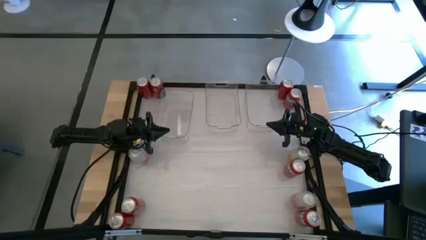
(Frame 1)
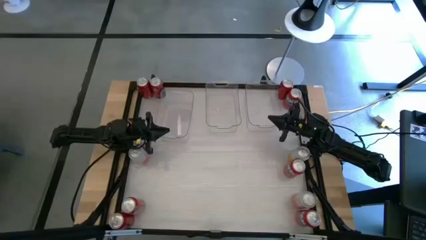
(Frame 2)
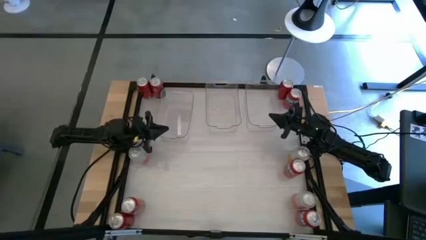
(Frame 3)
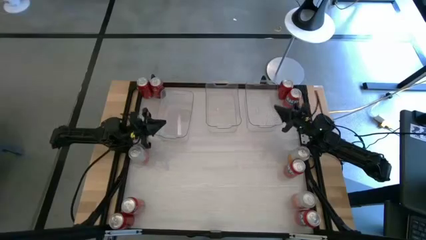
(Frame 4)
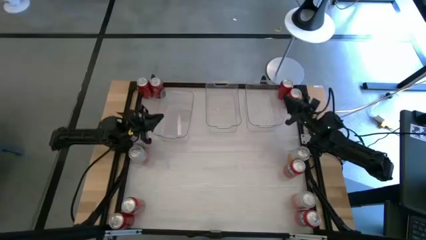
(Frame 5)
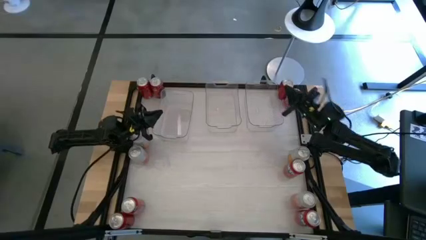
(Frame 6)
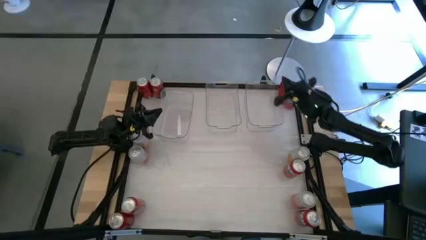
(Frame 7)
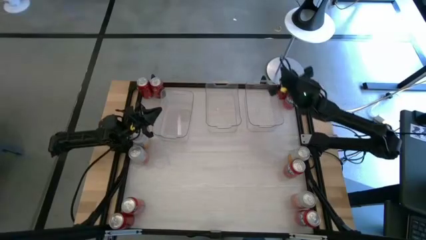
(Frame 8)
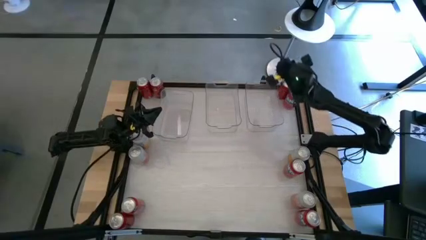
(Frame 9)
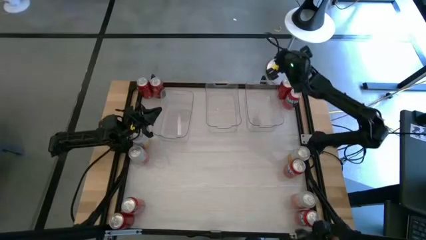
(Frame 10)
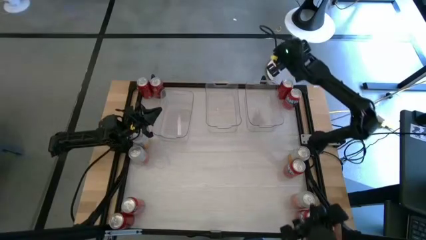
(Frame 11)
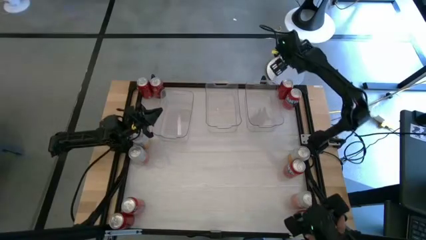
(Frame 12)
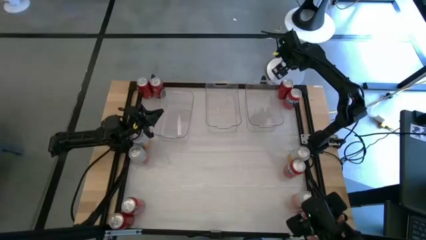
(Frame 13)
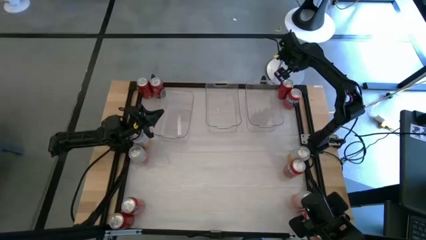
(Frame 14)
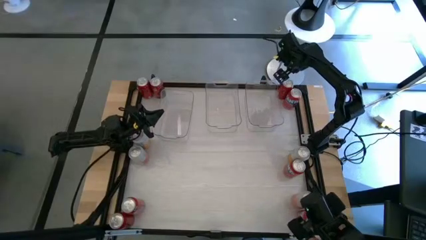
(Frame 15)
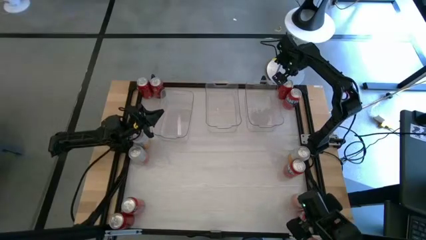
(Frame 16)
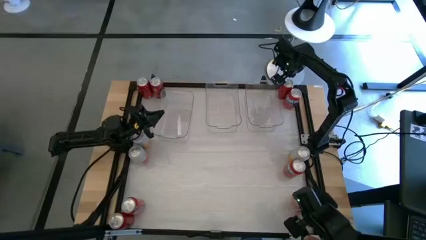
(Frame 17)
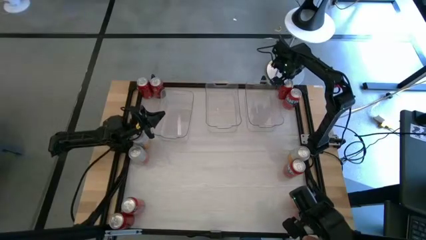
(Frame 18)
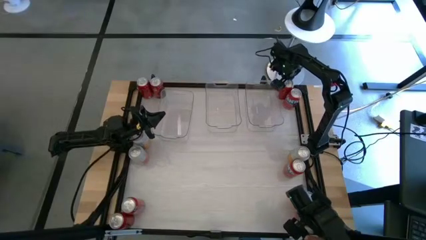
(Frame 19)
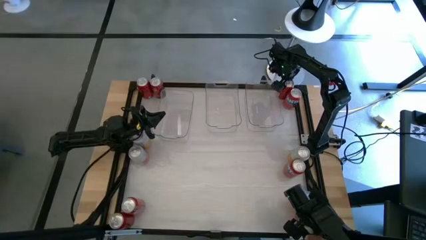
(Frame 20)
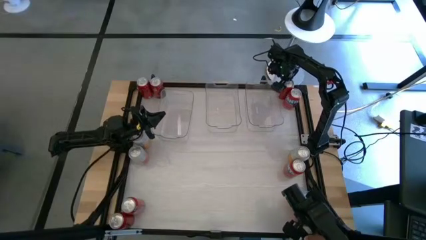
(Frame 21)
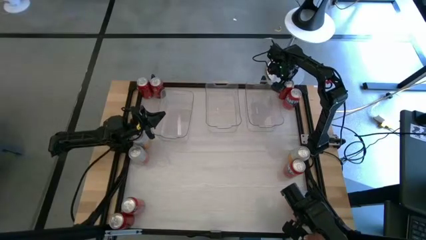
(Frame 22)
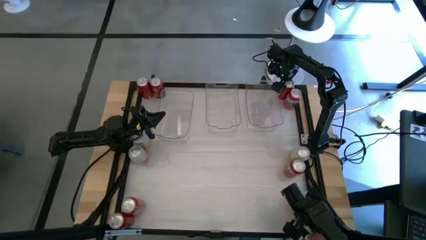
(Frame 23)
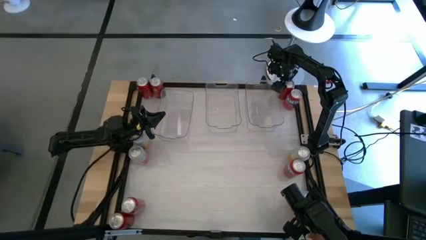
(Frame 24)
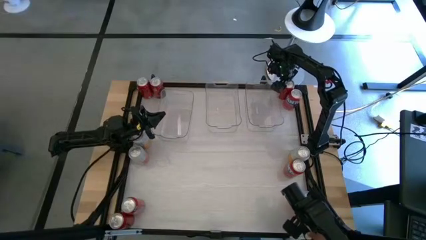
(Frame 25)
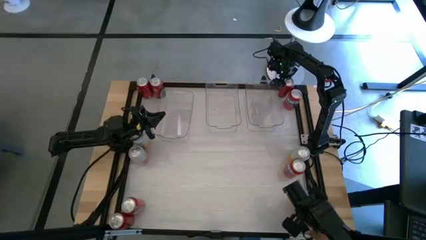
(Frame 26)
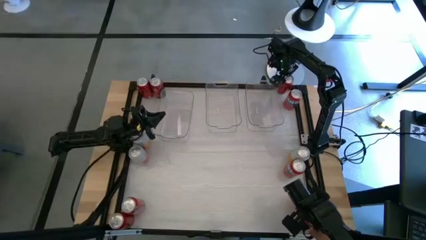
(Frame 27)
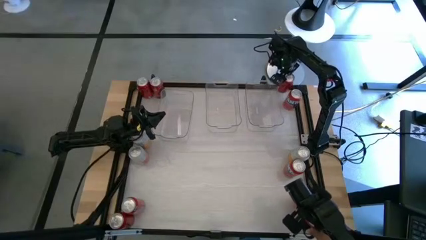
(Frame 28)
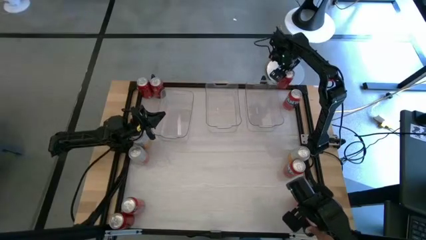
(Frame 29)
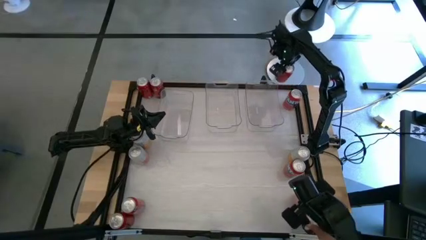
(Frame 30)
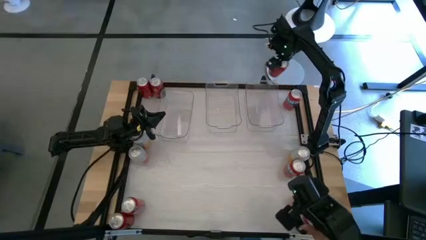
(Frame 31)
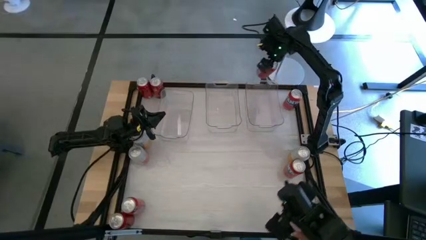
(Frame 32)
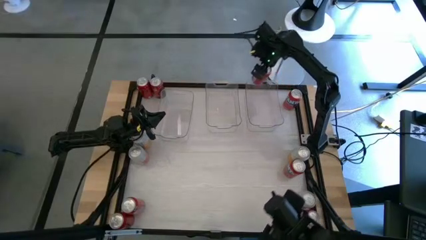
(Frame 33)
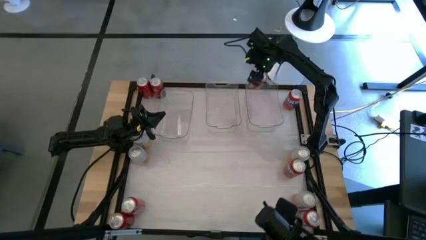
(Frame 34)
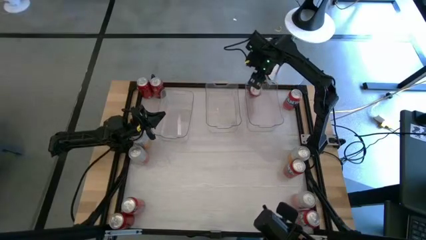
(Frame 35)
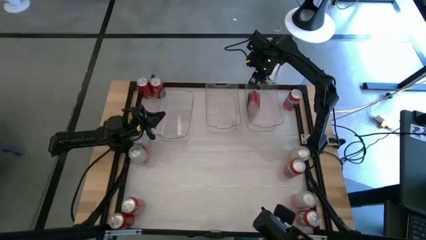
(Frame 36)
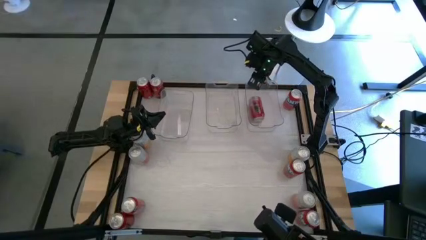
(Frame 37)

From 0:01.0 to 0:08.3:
Task: Sort soda cans
Put the top right red black soda can into the right transparent bin

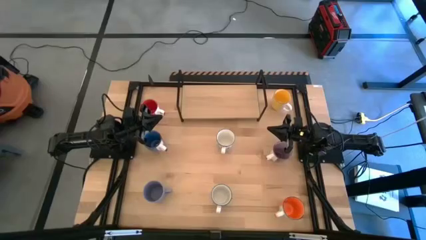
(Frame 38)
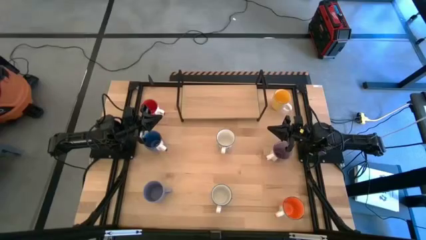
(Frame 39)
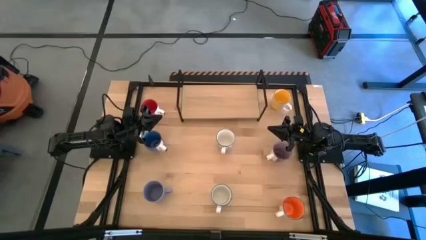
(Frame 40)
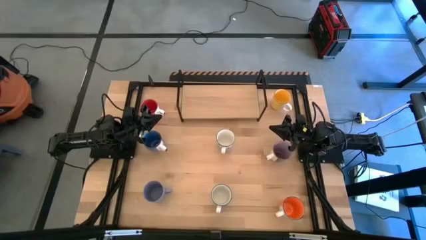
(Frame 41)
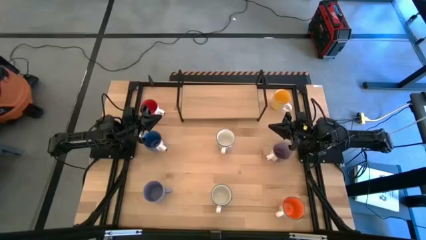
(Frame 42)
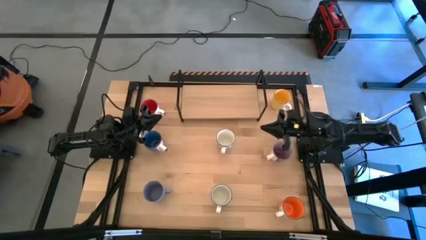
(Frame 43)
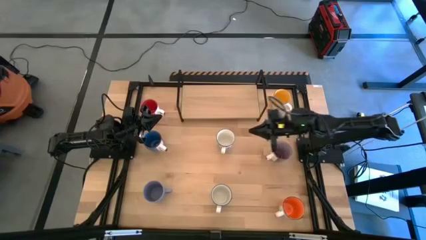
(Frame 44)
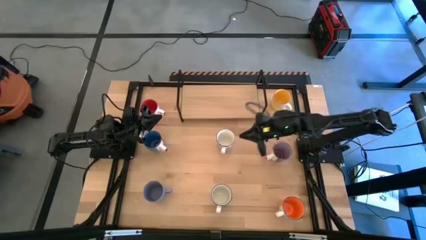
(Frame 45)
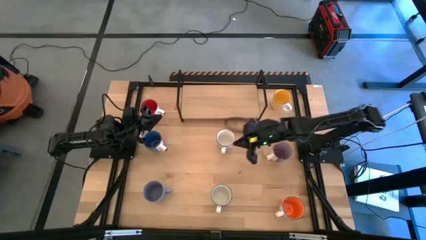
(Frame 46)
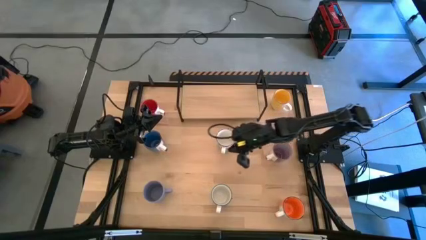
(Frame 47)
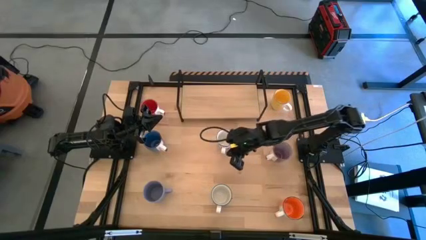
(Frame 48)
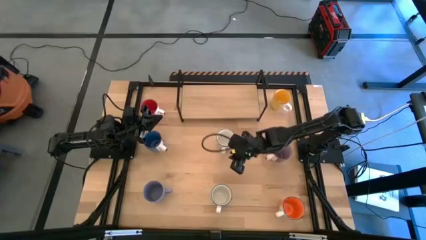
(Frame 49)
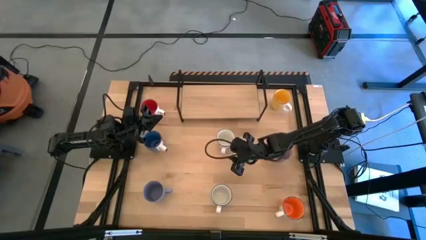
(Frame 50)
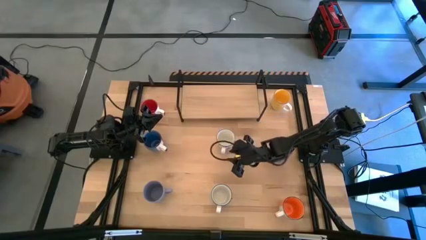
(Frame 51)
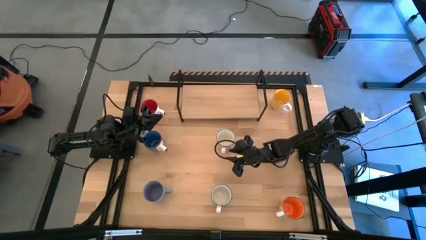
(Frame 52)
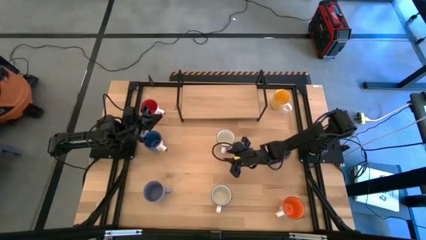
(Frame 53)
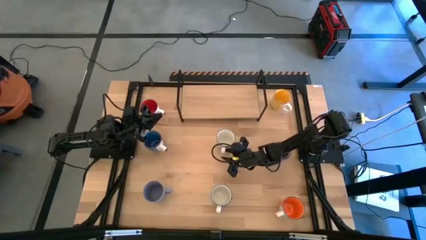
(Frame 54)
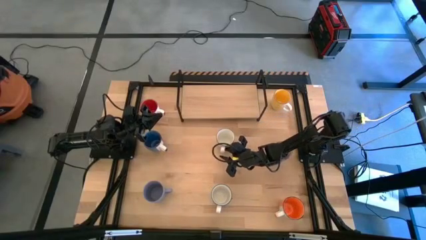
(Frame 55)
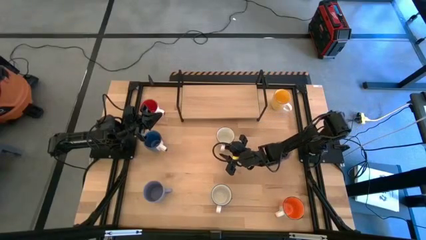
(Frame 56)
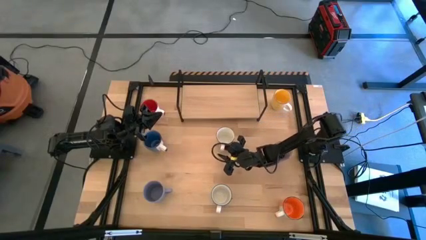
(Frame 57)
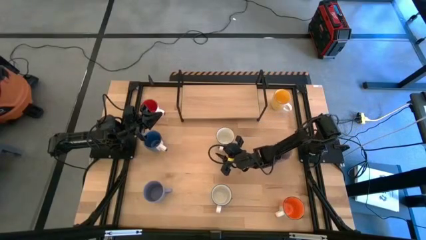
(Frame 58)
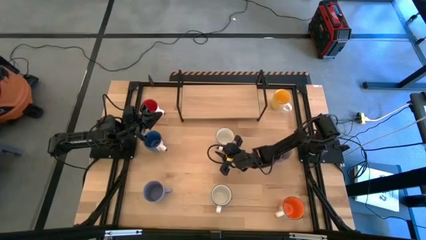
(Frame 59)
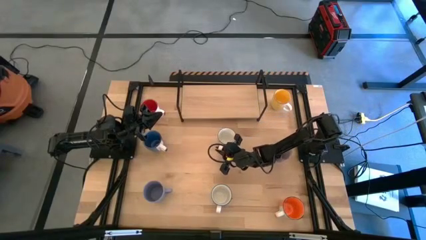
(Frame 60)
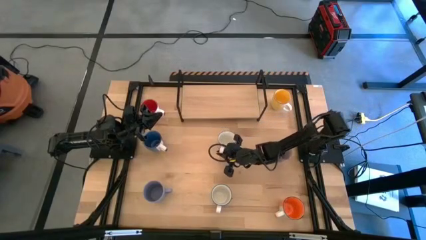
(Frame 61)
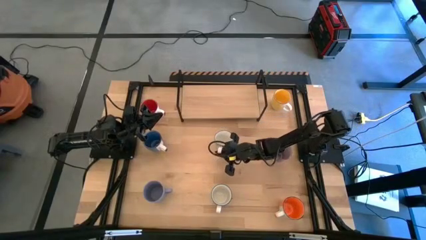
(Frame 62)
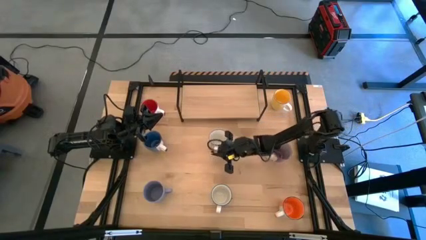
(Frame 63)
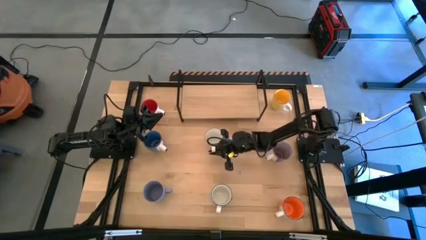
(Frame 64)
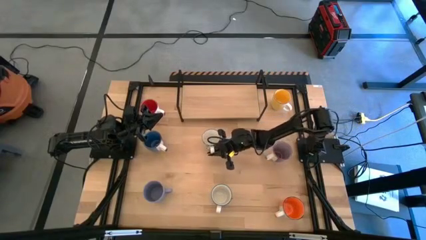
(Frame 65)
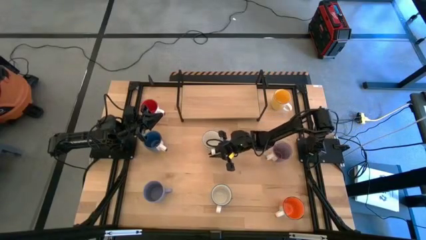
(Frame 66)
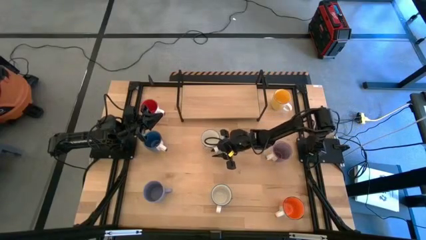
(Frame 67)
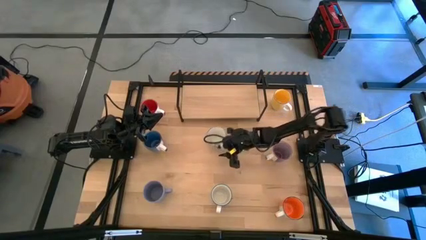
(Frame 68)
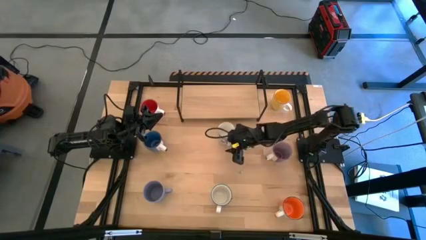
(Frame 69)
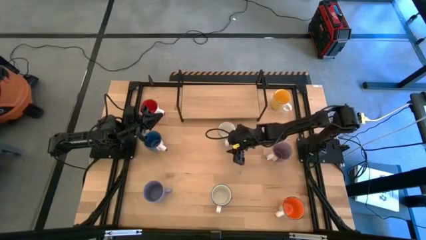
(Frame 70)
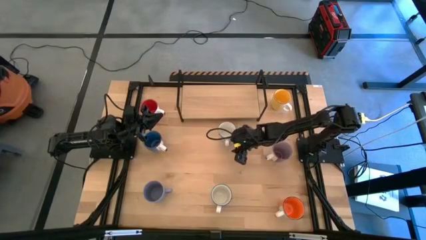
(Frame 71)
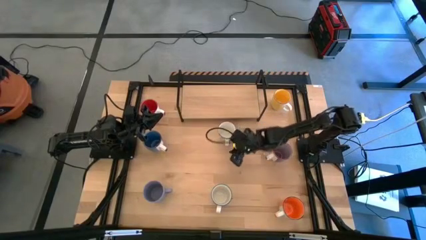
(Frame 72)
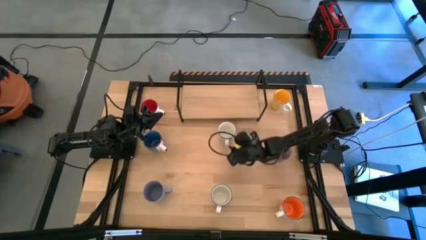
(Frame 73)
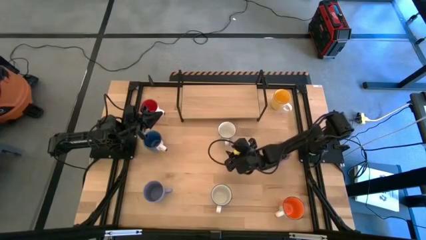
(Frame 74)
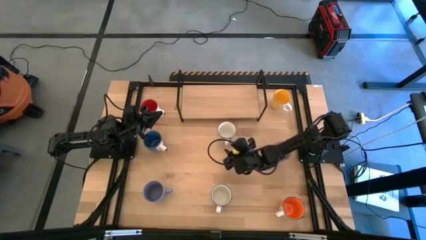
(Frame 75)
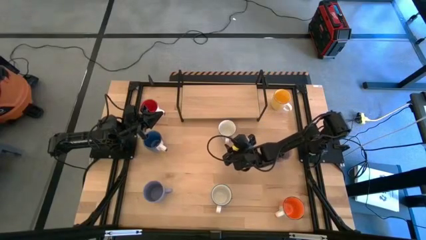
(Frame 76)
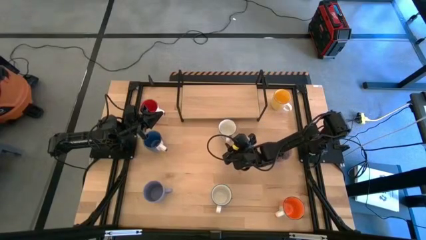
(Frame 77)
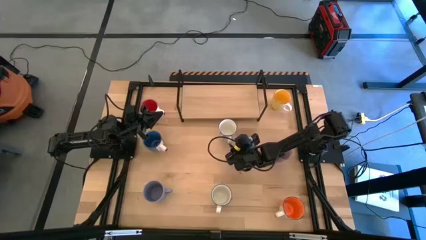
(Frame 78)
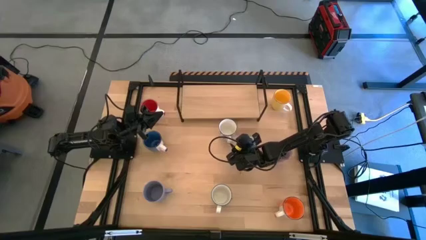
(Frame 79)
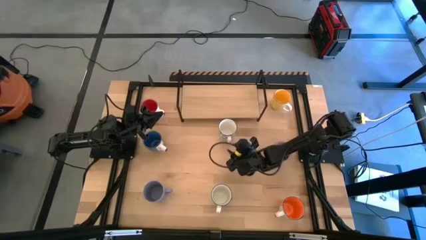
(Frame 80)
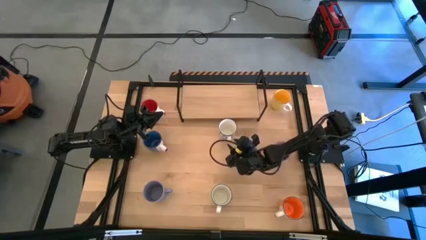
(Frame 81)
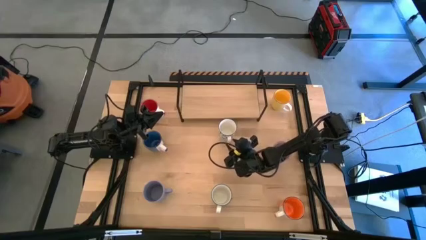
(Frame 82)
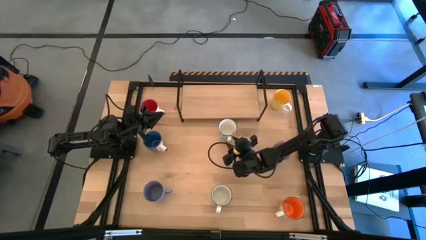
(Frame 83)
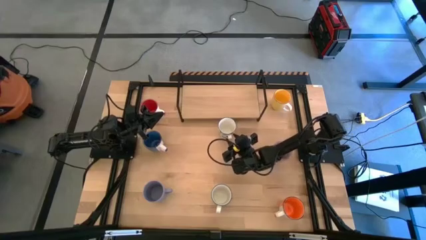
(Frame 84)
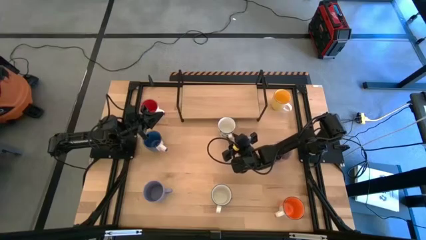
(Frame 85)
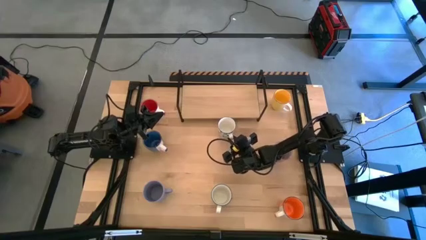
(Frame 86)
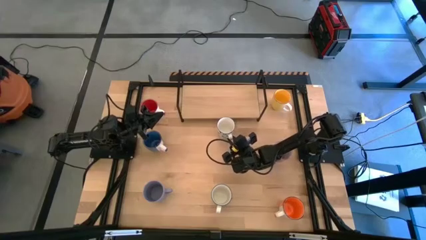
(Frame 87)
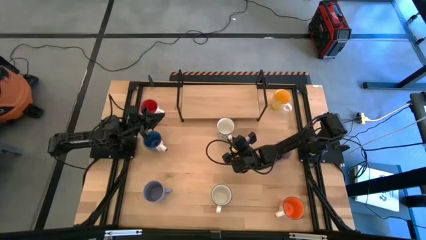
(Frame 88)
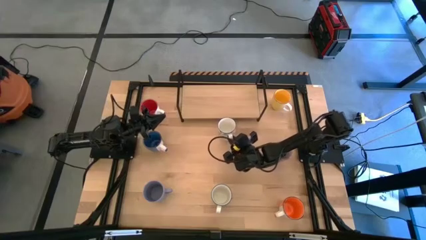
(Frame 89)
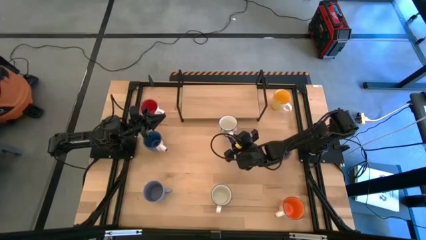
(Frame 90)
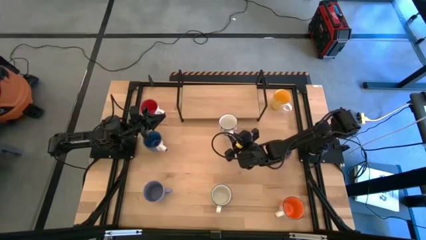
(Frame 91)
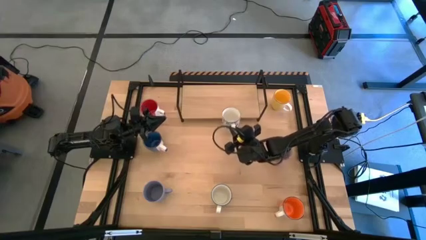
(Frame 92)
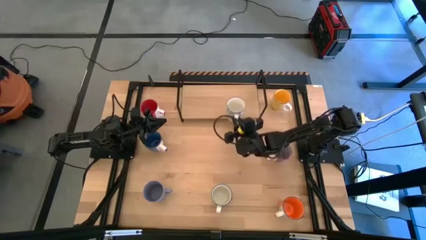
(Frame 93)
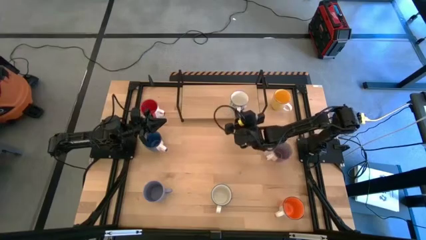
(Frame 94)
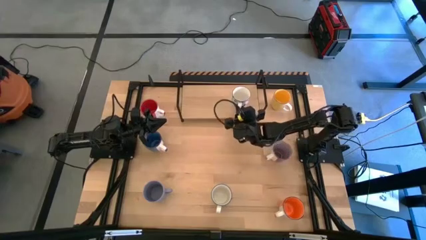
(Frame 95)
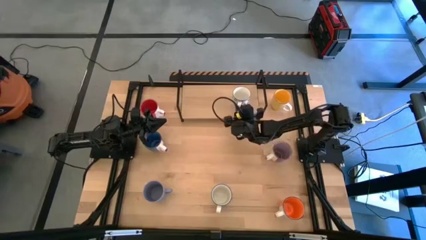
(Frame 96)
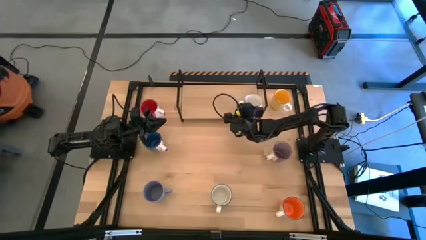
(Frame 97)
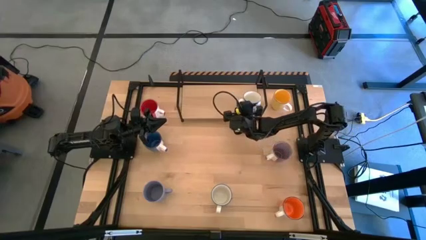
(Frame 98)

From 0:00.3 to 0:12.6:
Task: Place coffee mugs
Put the top blue patterned mug on the shelf
